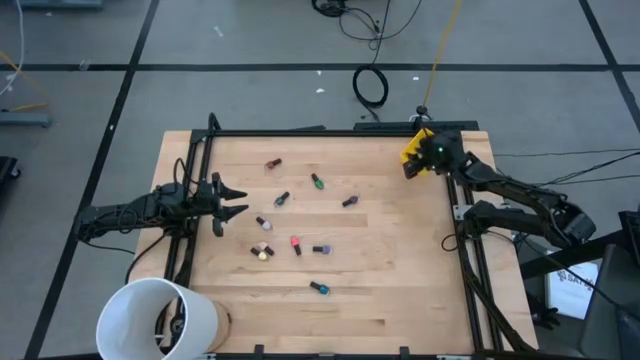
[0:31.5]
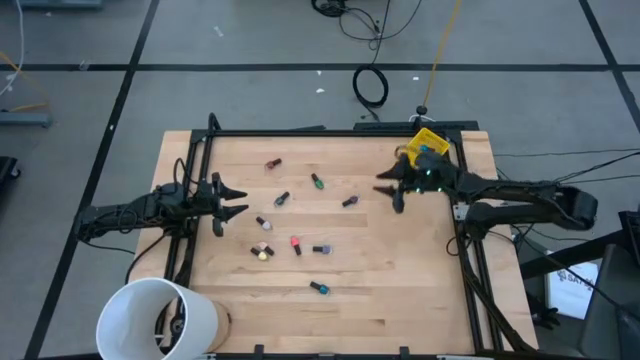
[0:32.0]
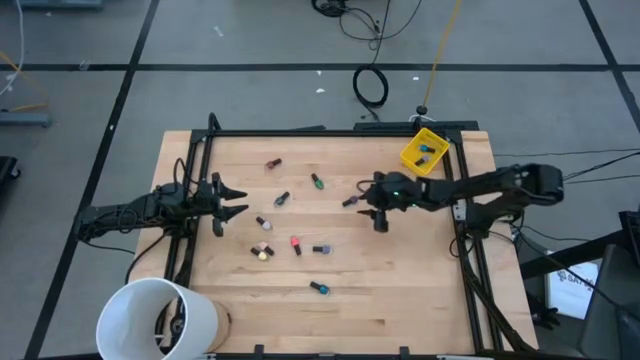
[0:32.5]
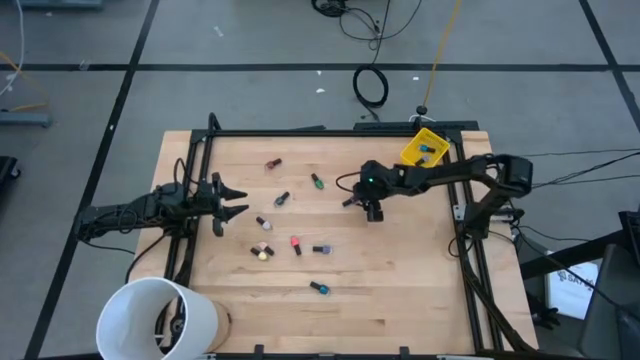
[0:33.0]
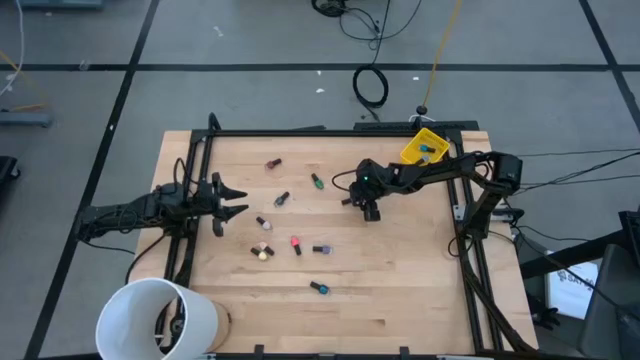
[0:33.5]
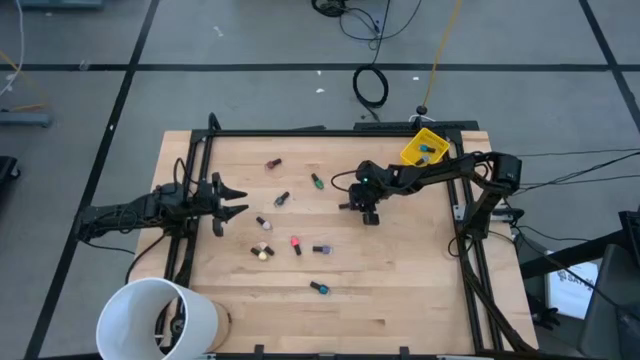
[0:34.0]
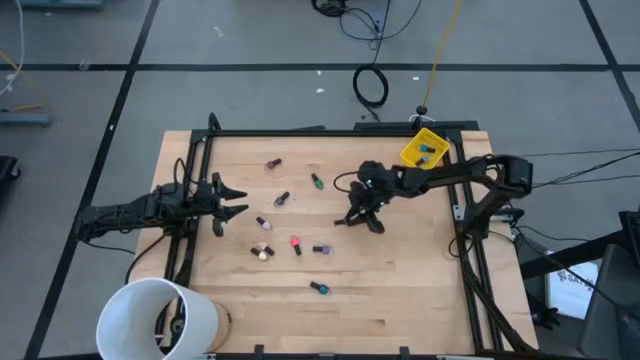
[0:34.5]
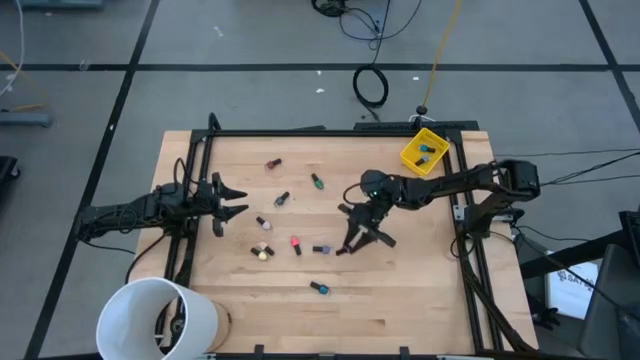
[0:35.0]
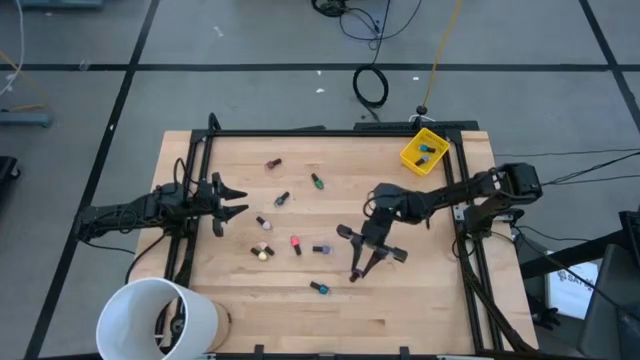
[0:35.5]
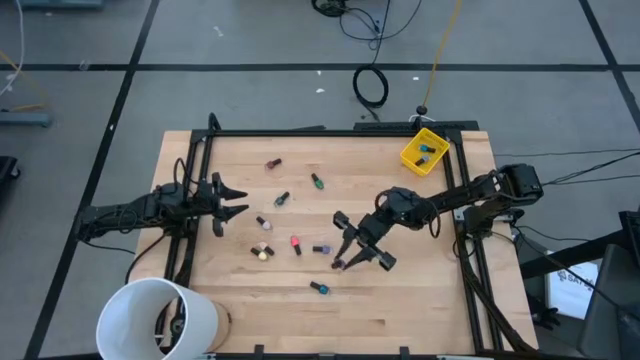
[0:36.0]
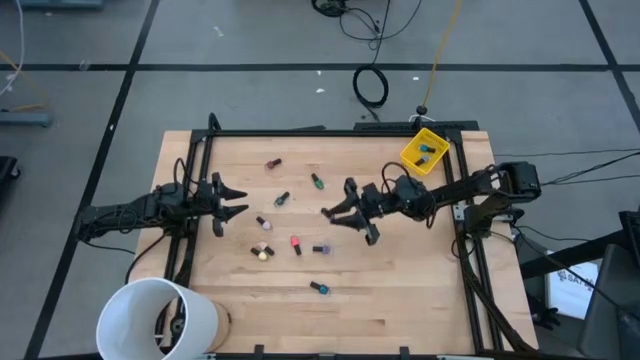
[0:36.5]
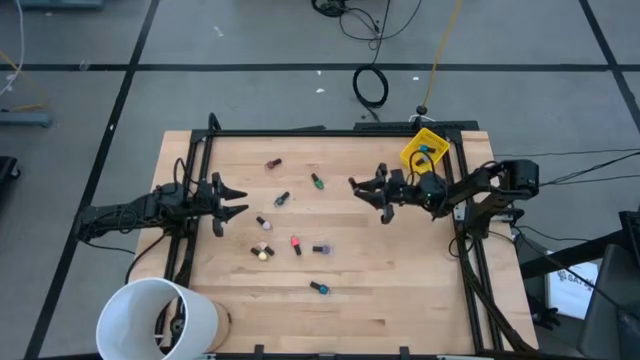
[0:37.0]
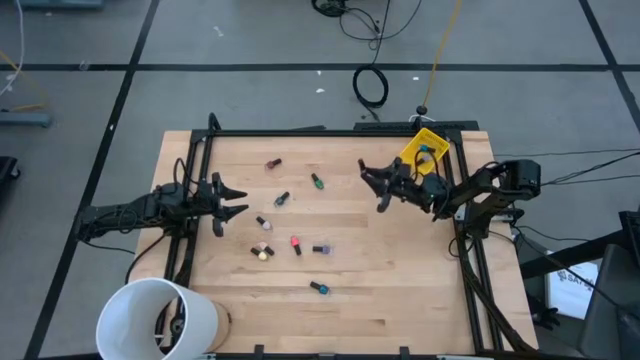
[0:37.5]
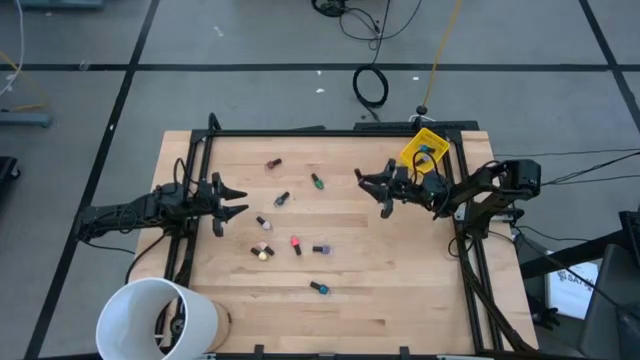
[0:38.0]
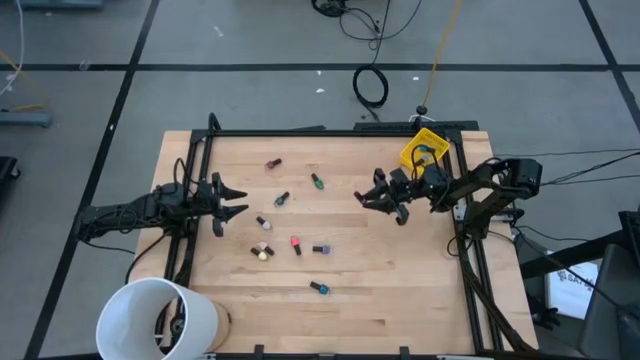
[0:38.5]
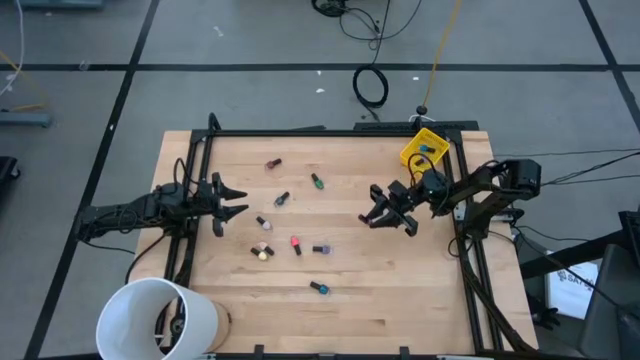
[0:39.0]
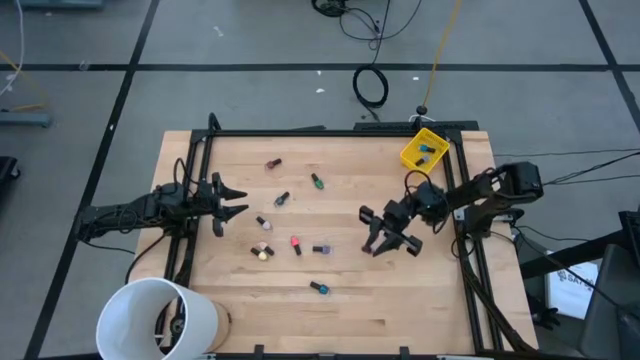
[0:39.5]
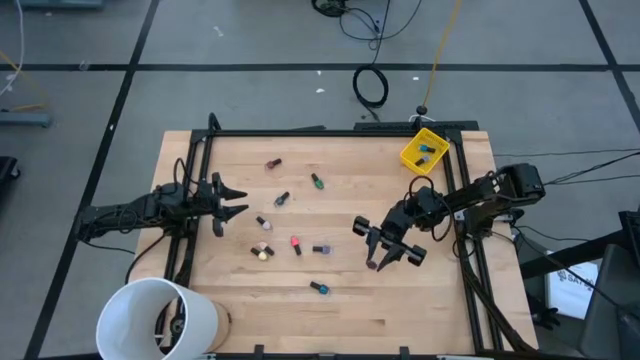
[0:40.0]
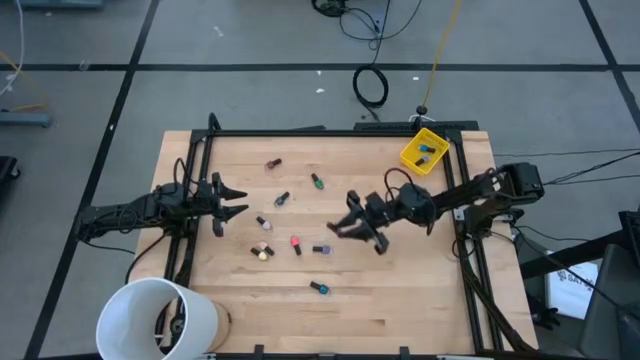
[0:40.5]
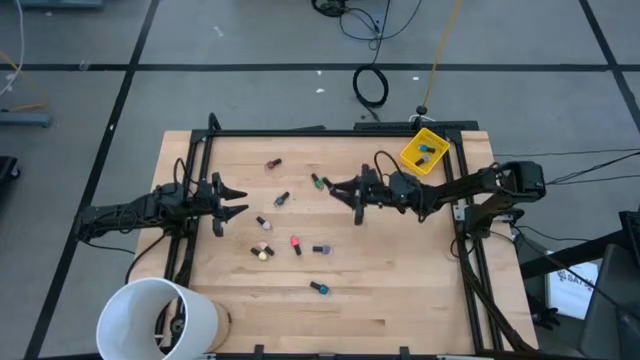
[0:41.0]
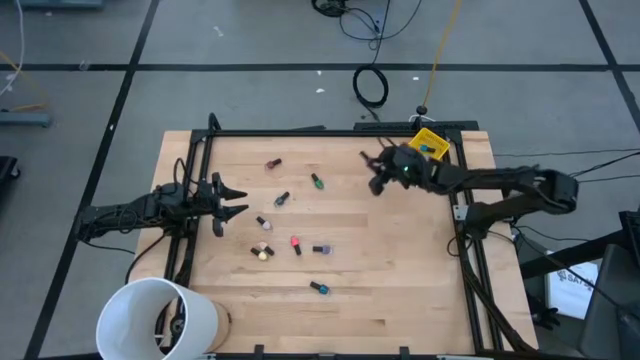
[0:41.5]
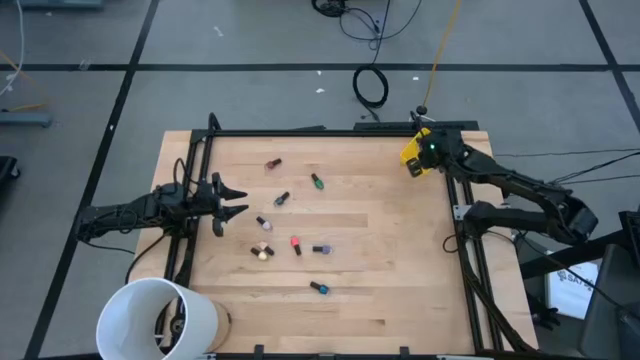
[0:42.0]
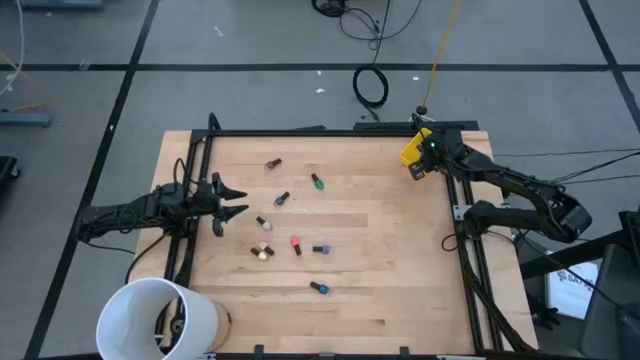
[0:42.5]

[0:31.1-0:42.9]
Task: Pick & Place Nail Polish
Put the purple nail polish bottle into the yellow bin

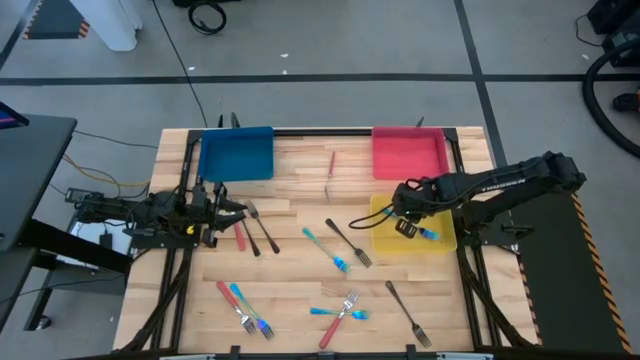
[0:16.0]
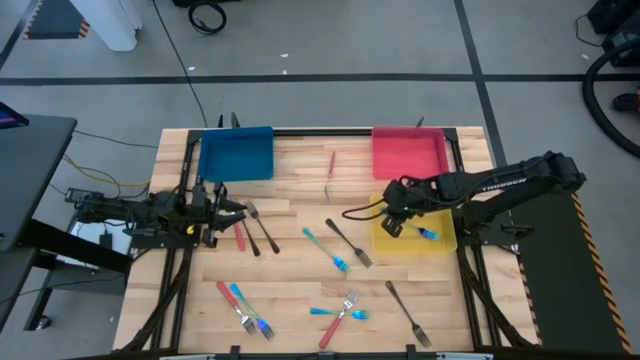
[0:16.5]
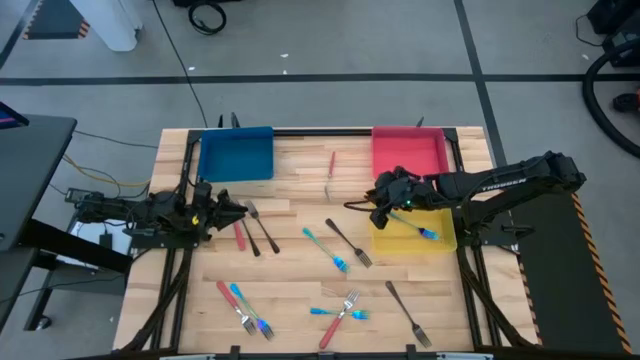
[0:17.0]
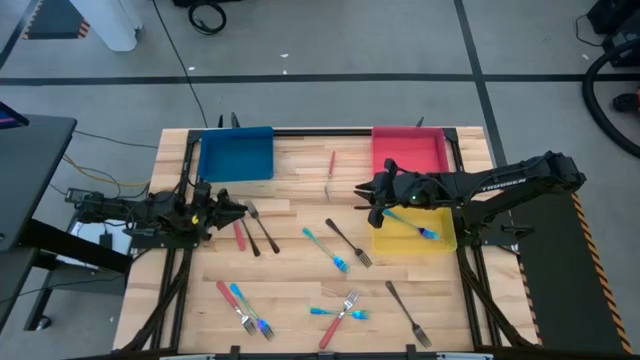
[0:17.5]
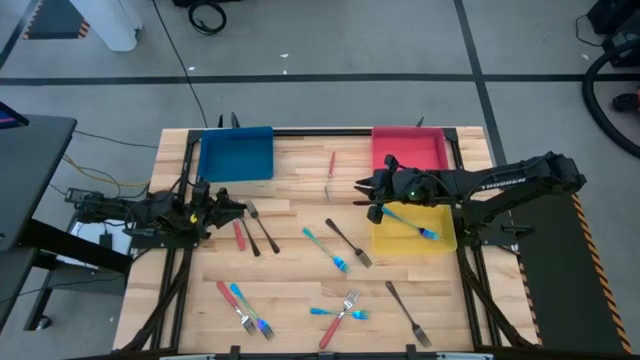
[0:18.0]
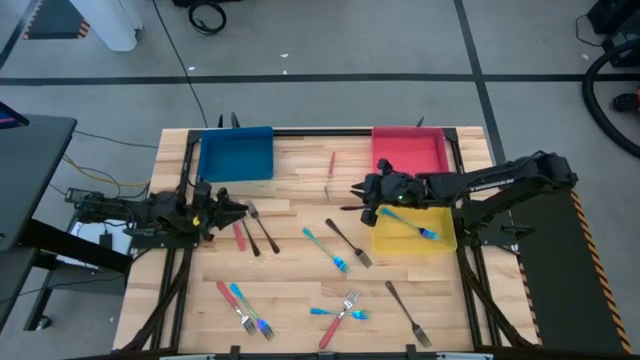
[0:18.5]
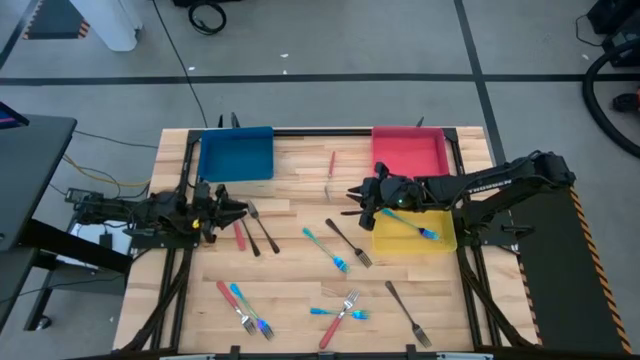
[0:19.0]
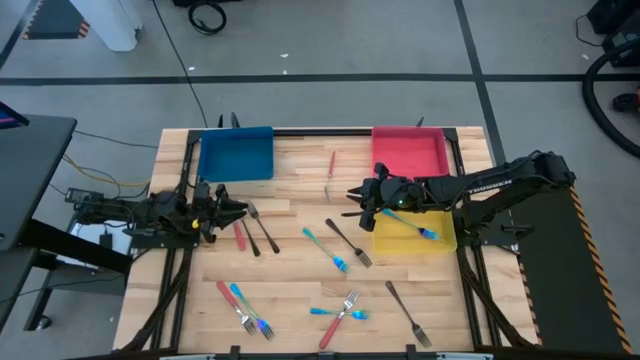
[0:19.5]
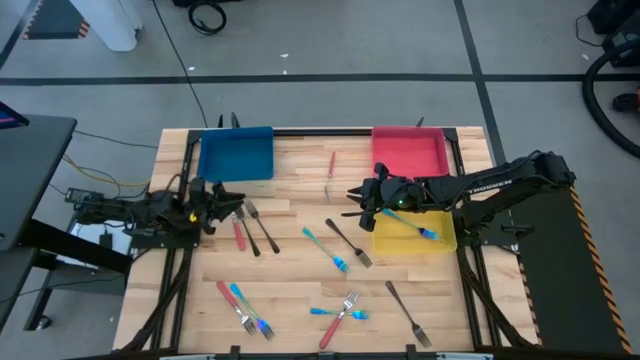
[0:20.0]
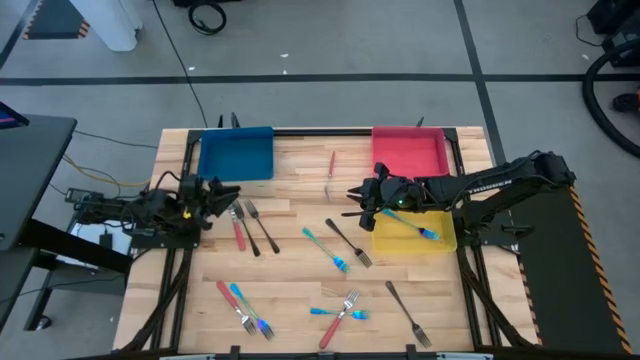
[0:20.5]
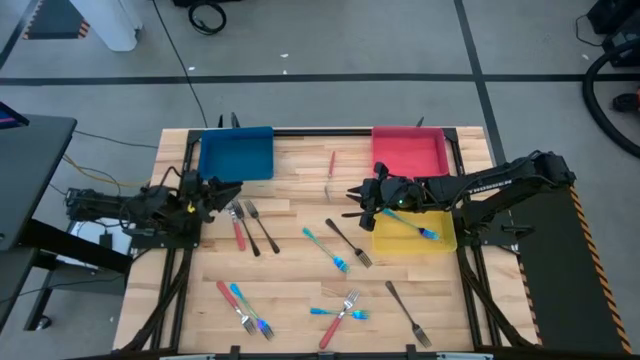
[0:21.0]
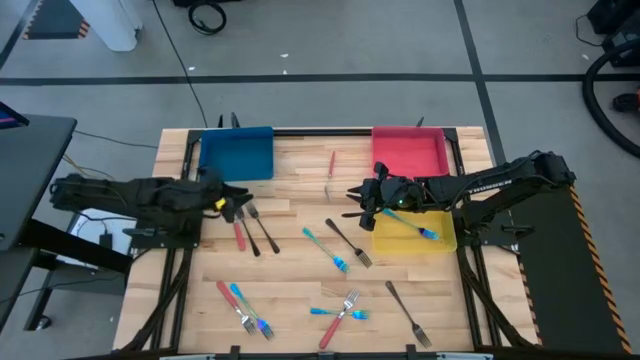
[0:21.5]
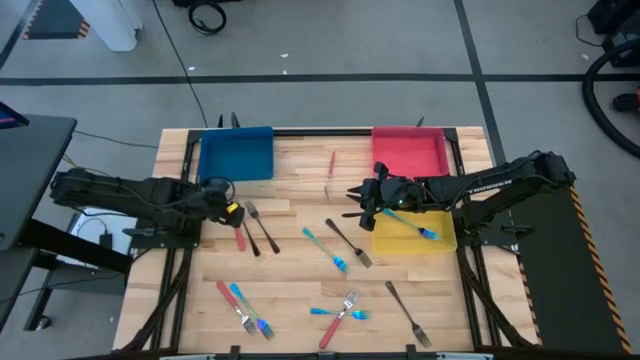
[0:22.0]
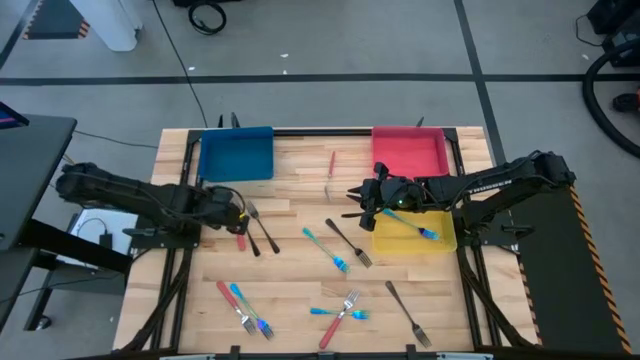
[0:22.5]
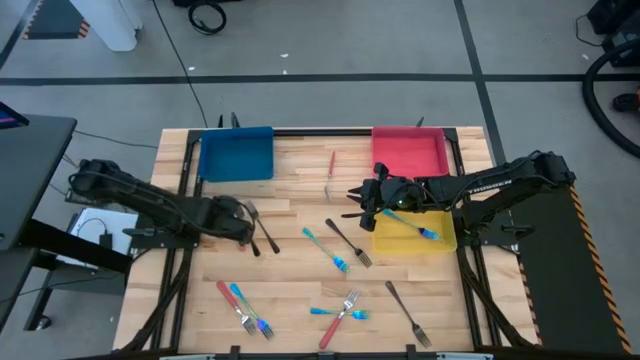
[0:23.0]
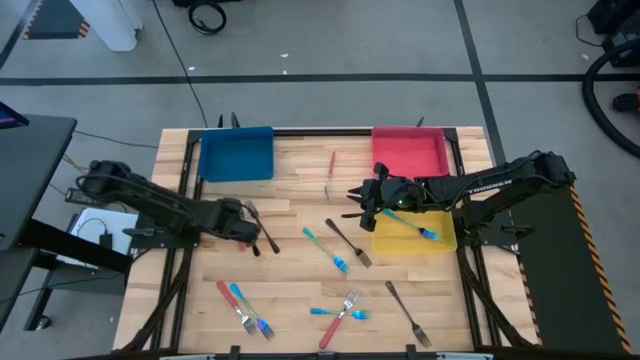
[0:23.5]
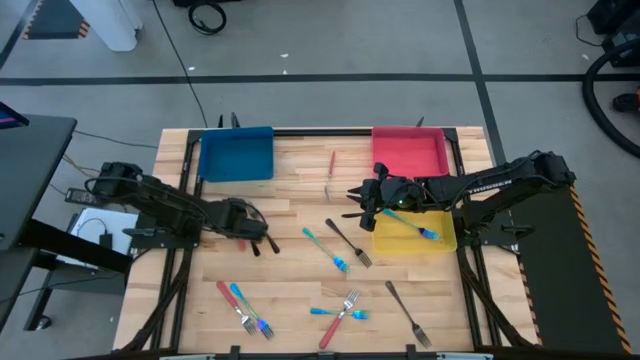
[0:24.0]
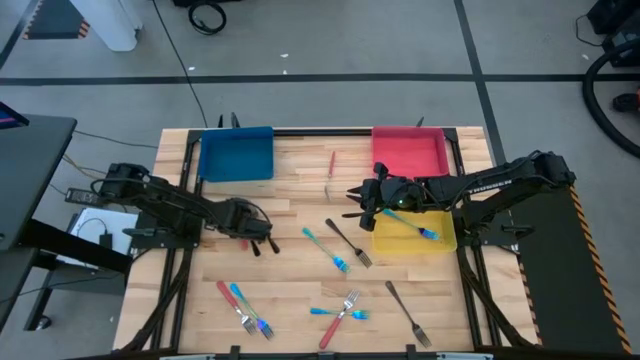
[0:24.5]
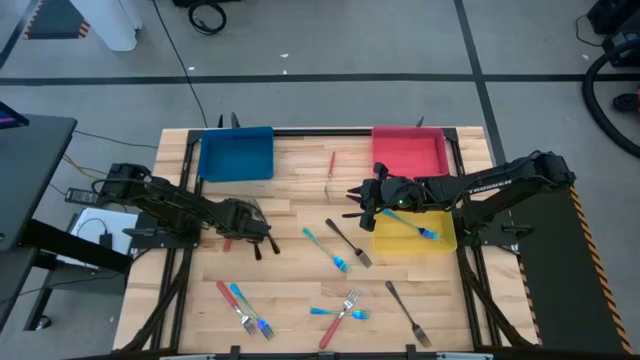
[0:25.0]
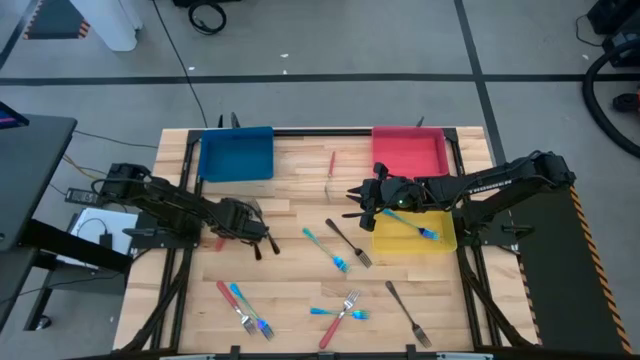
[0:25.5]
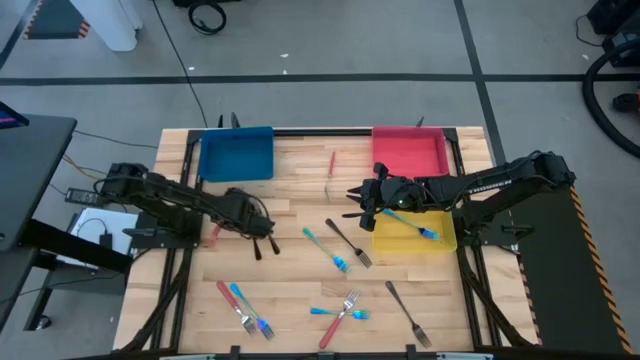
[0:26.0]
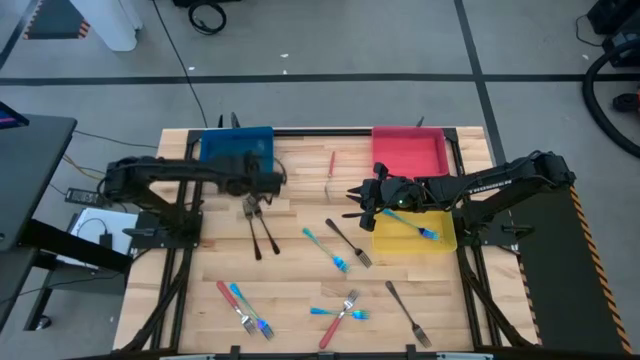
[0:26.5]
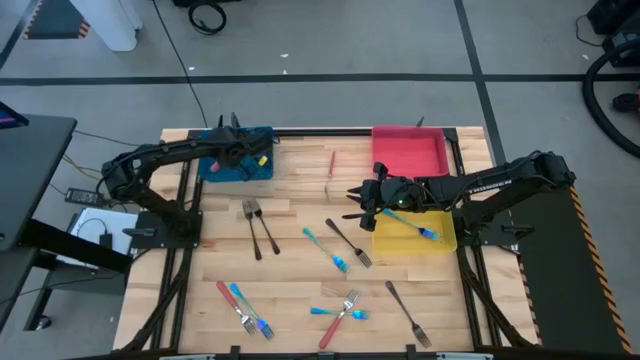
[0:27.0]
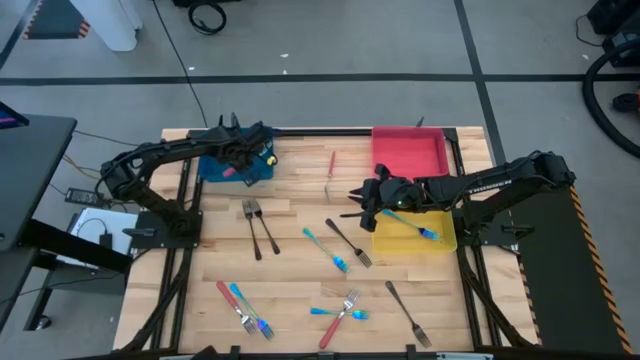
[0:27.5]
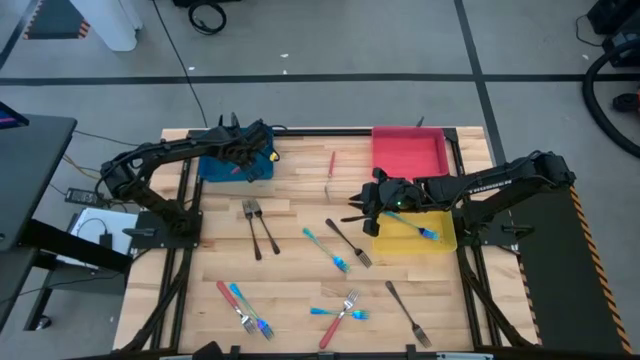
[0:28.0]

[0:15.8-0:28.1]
Task: Sort silverware by color (type)
Put the middle left pink fork into the blue bin
